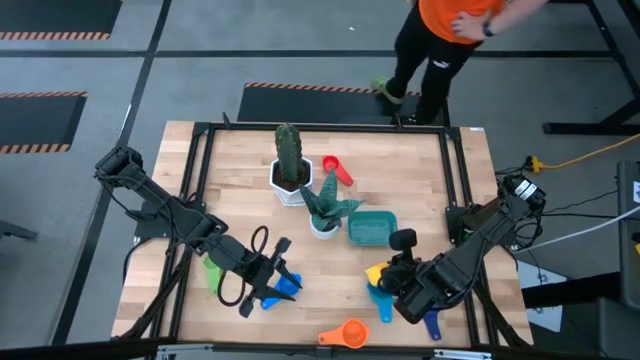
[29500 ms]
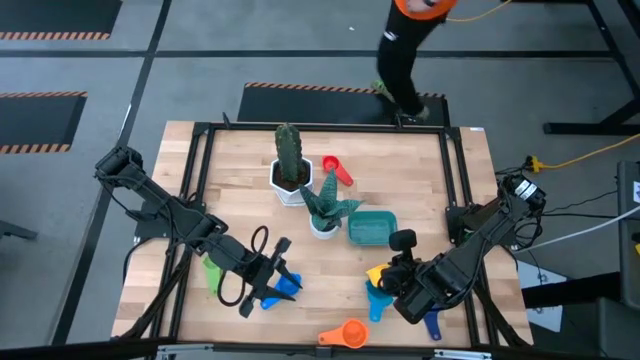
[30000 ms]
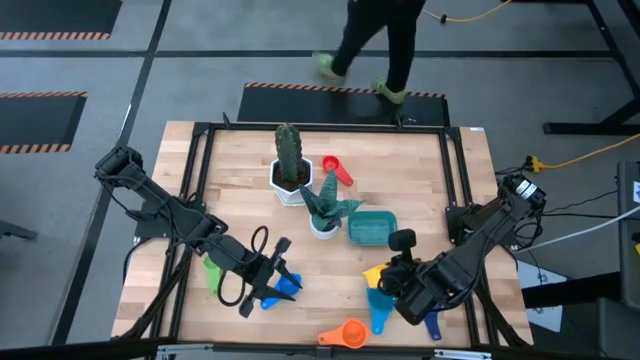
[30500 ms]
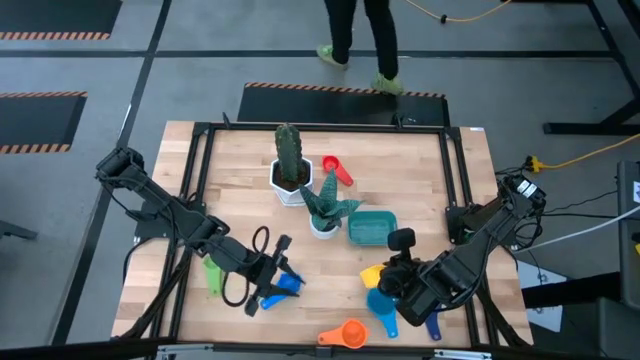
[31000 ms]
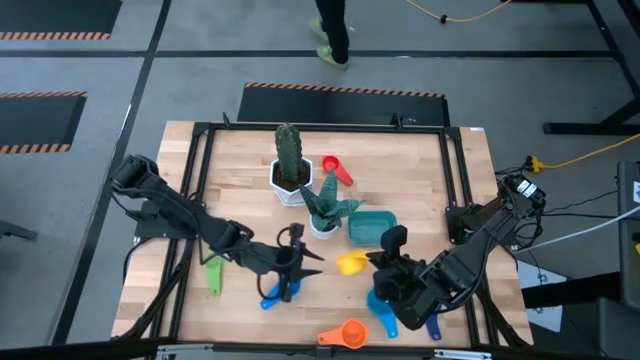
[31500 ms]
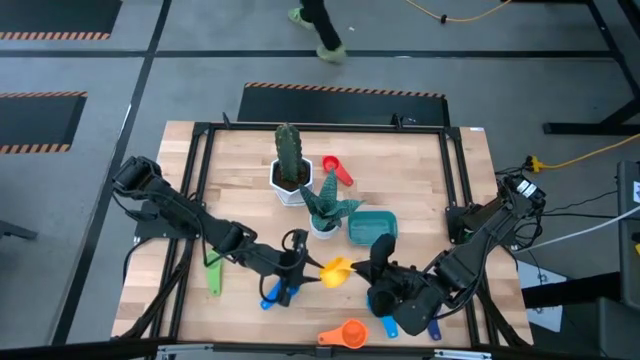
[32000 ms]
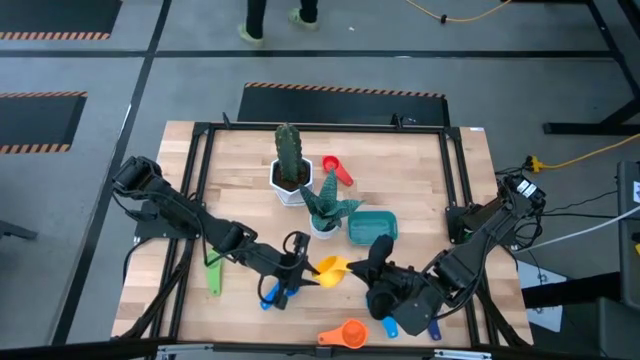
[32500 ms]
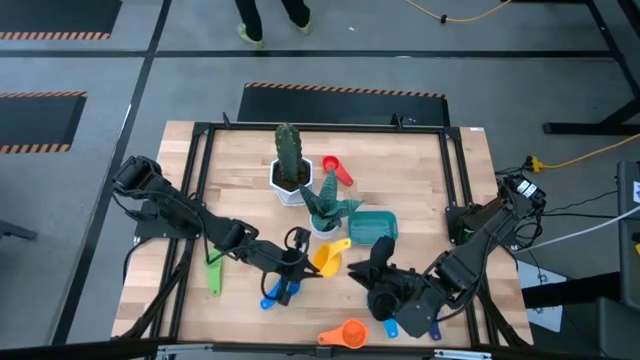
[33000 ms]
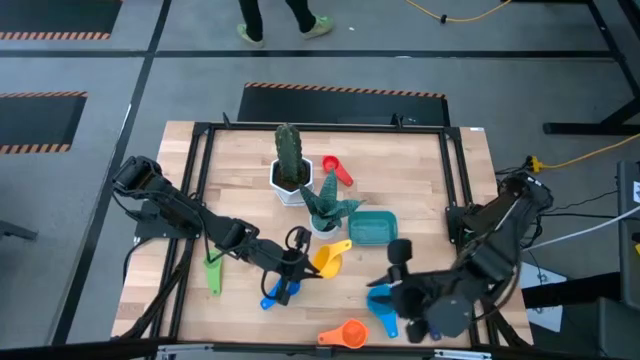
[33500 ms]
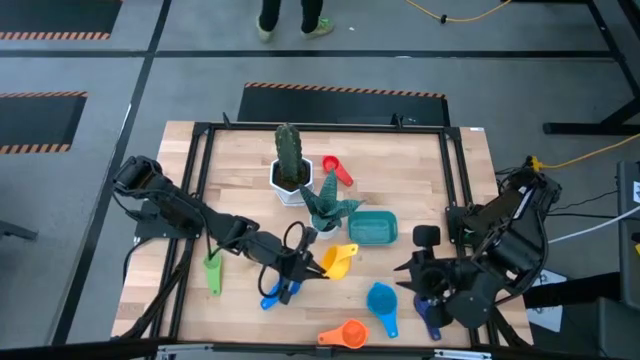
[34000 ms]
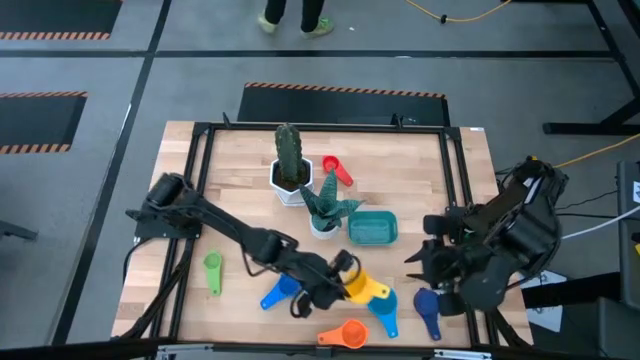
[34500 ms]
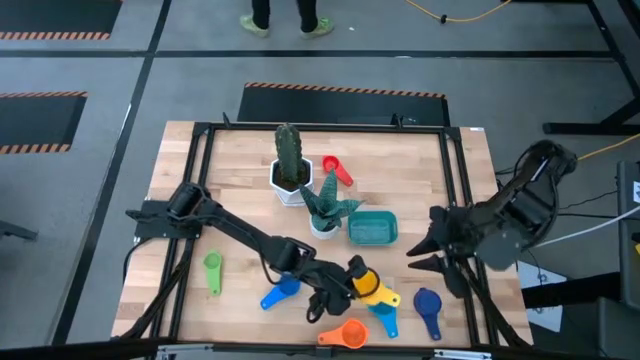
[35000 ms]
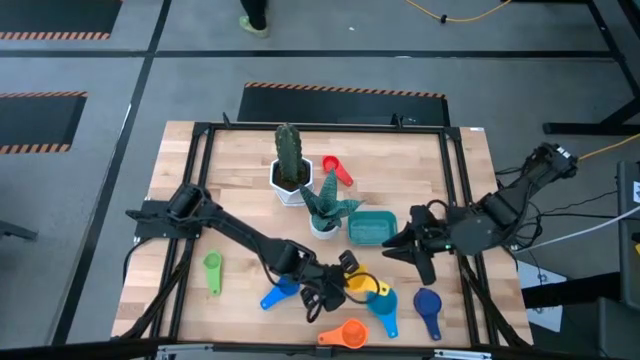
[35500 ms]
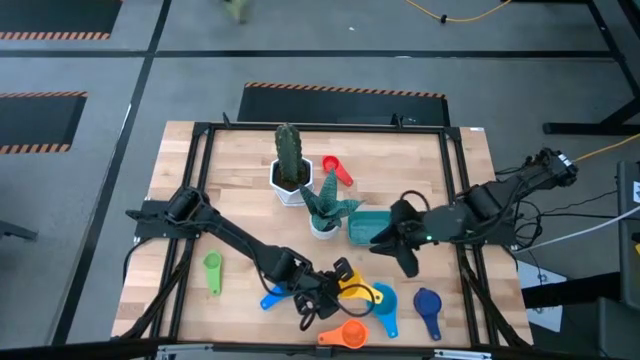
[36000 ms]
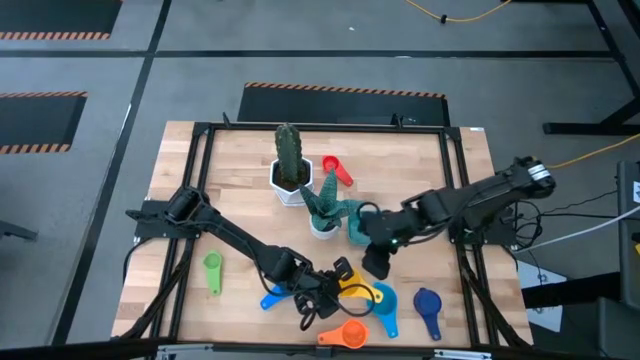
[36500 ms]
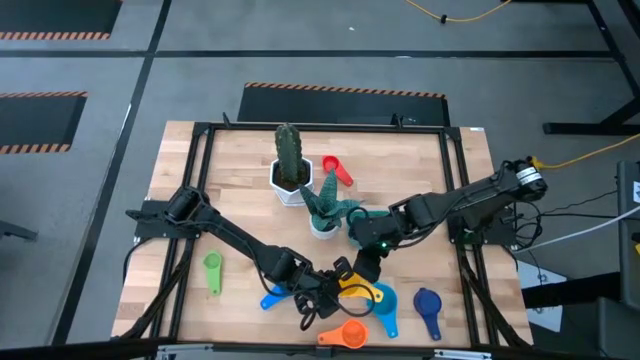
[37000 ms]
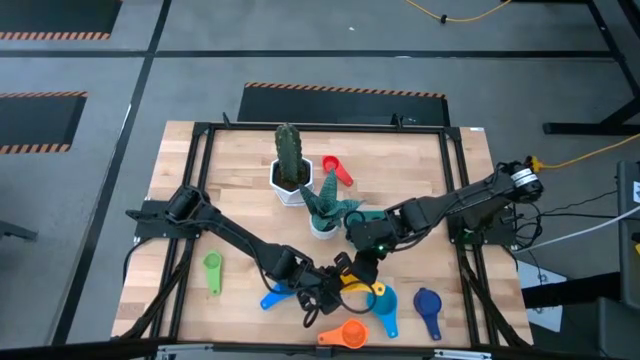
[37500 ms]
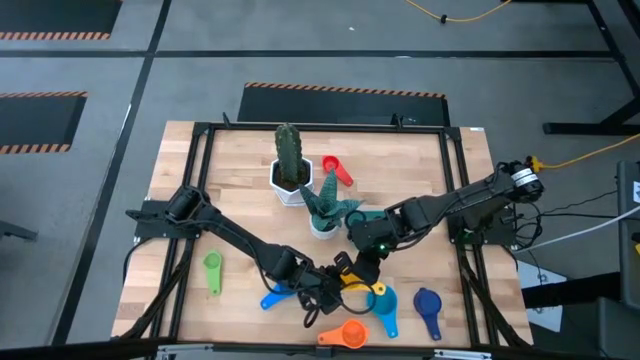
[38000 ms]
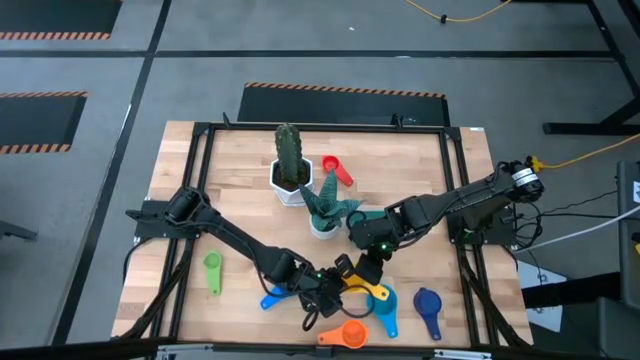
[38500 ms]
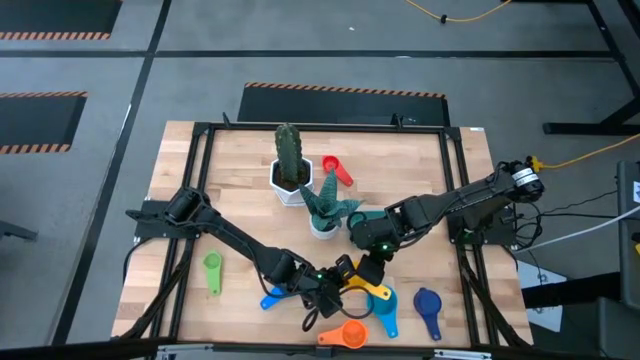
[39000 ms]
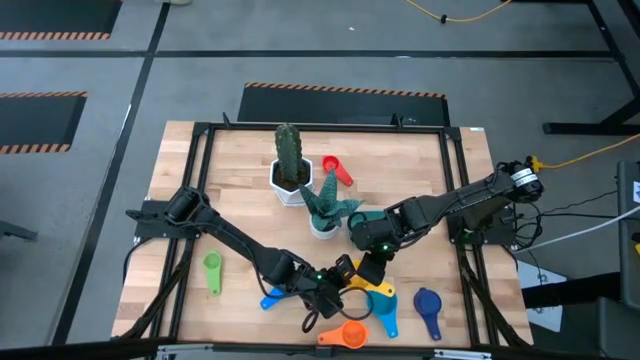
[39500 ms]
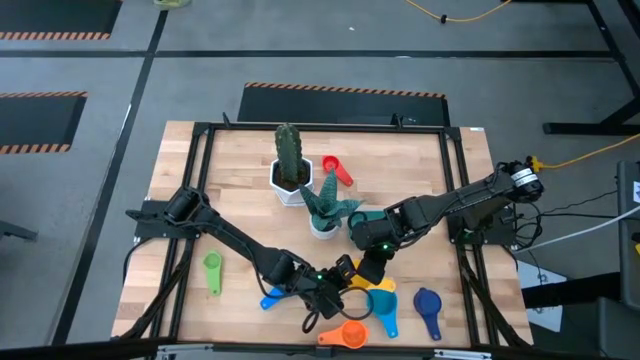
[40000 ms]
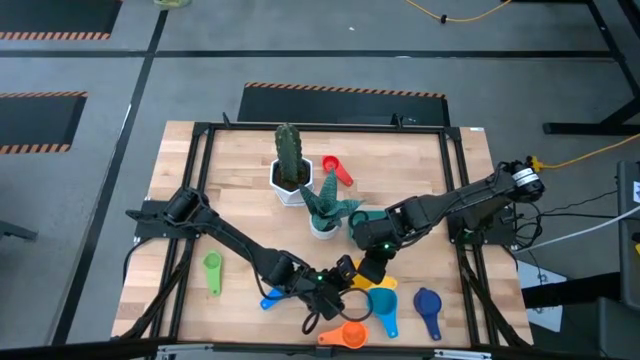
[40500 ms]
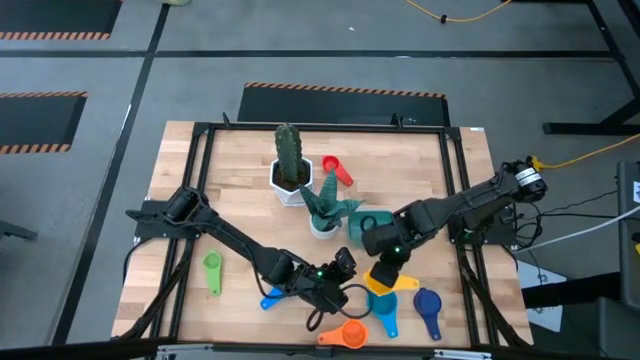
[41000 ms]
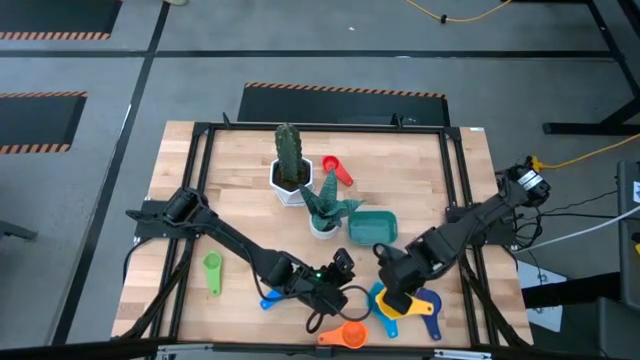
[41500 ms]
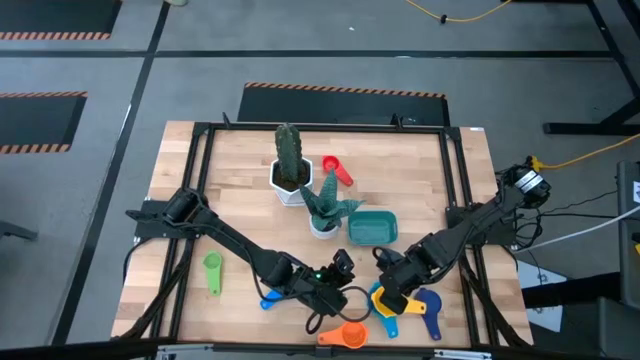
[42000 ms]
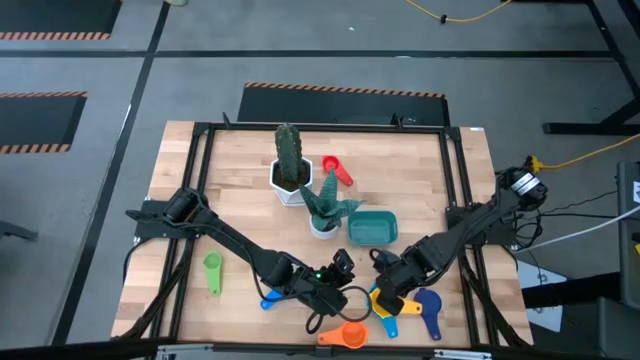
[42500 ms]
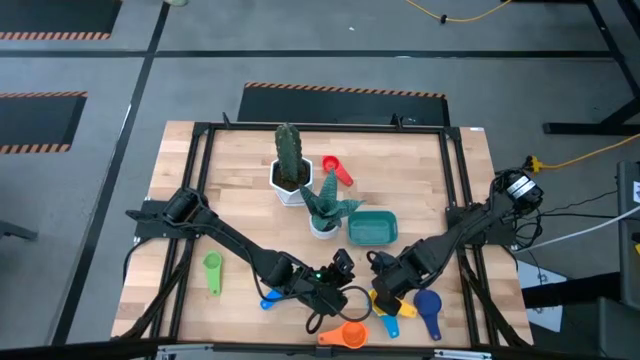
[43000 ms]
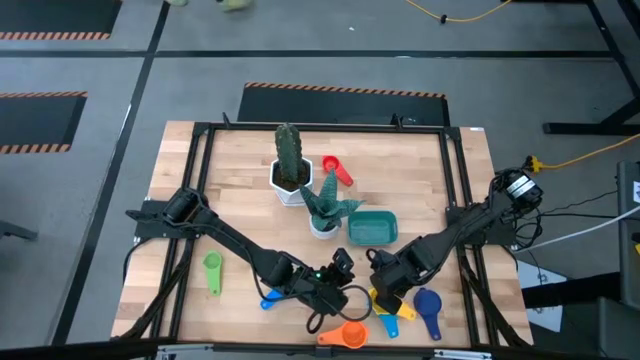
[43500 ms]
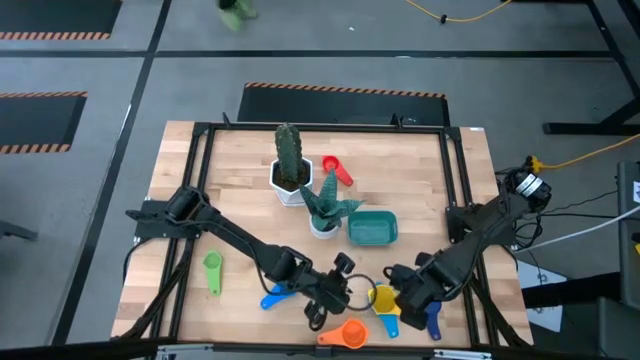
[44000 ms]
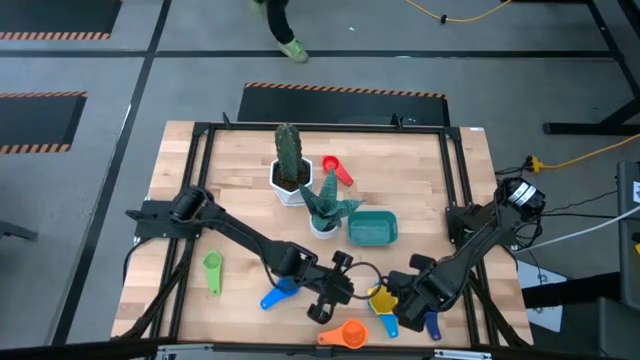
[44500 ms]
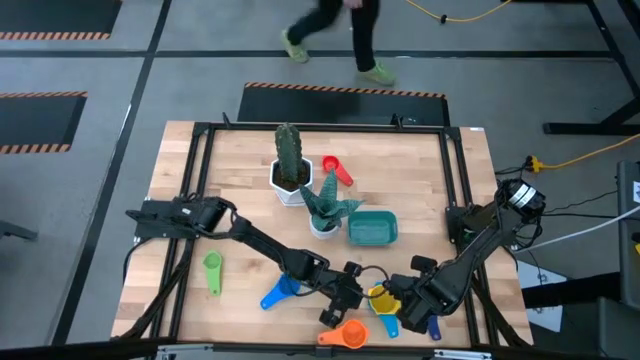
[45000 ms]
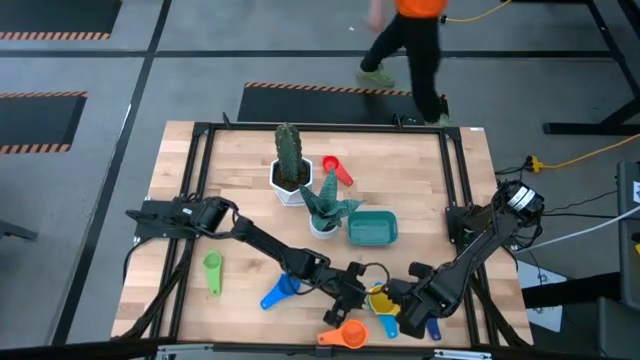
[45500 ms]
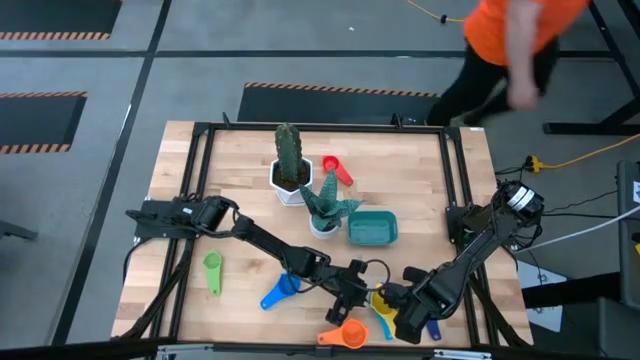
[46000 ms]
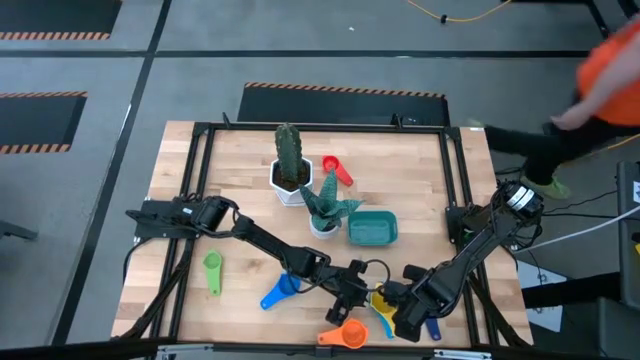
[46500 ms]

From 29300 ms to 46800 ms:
Task: Nest measuring cups in basket
Stack the yellow measuring cup on top of the light blue measuring cup

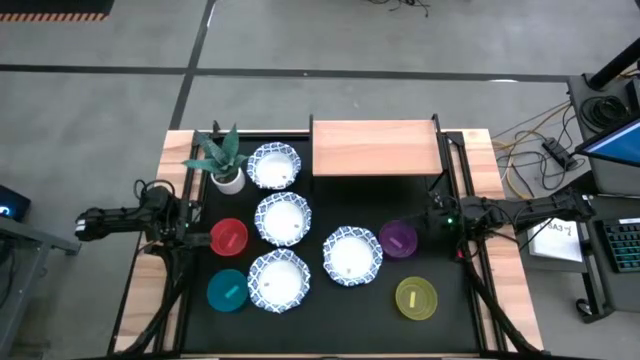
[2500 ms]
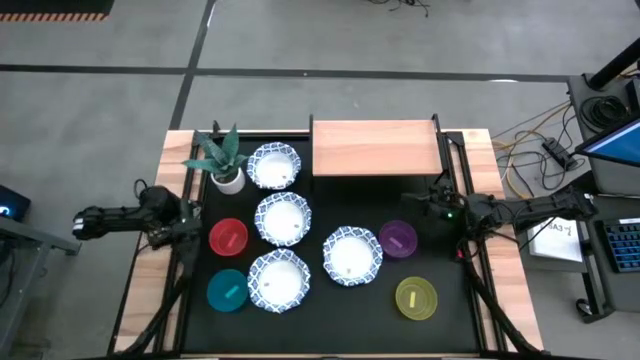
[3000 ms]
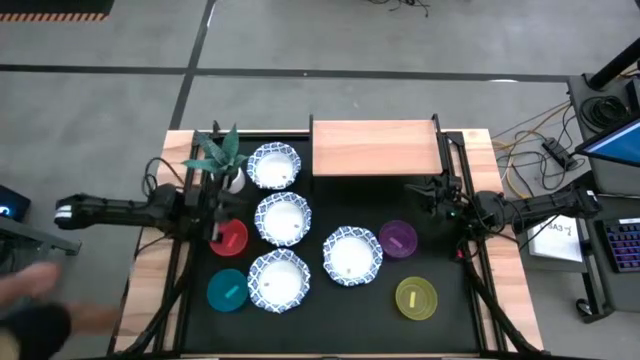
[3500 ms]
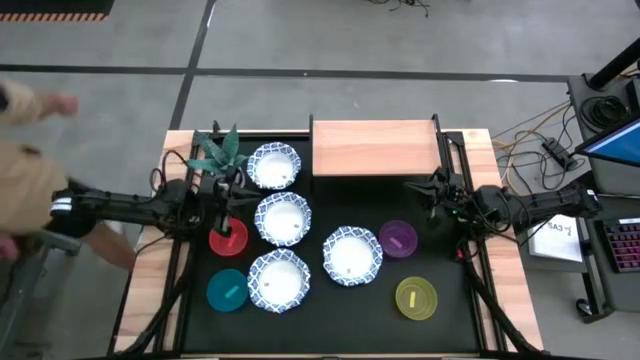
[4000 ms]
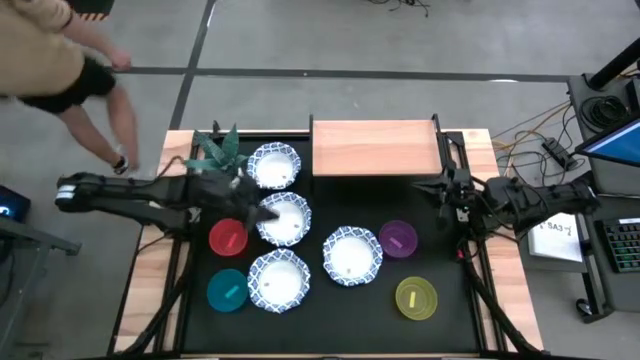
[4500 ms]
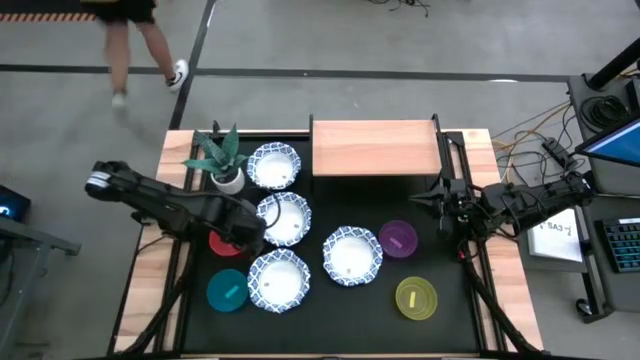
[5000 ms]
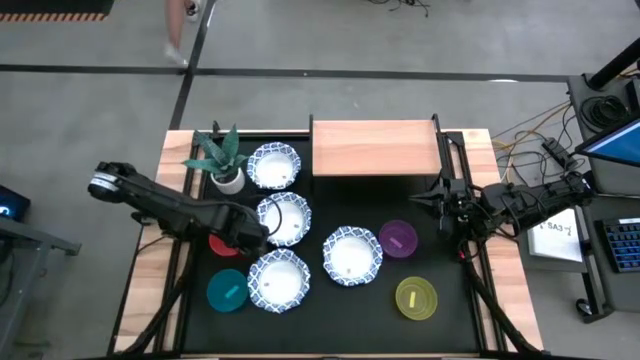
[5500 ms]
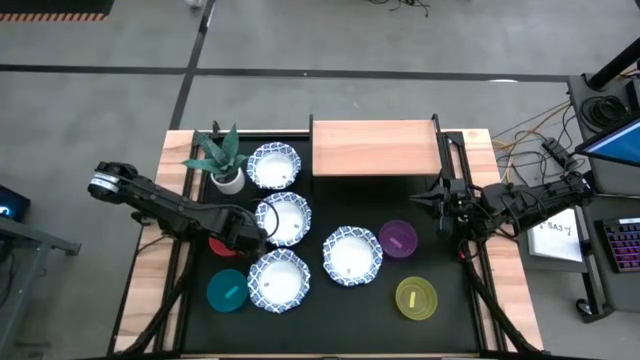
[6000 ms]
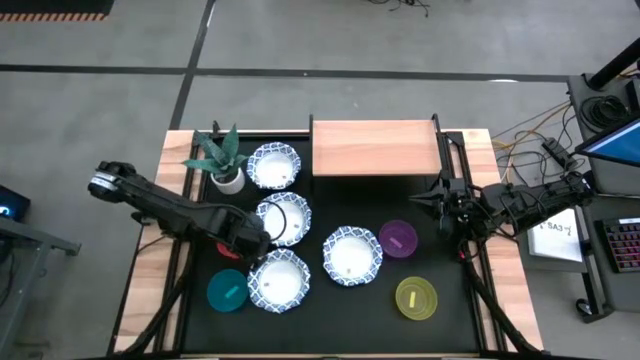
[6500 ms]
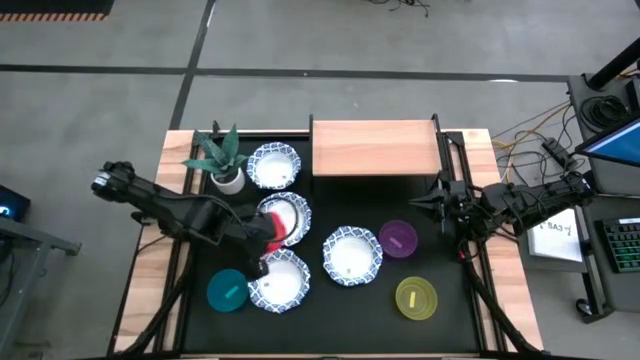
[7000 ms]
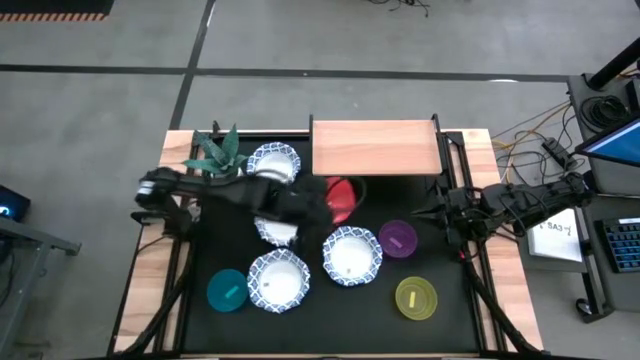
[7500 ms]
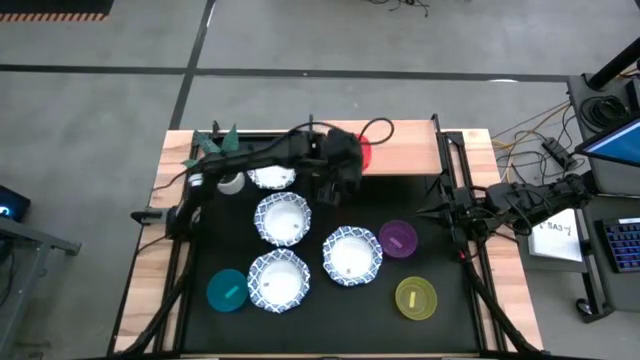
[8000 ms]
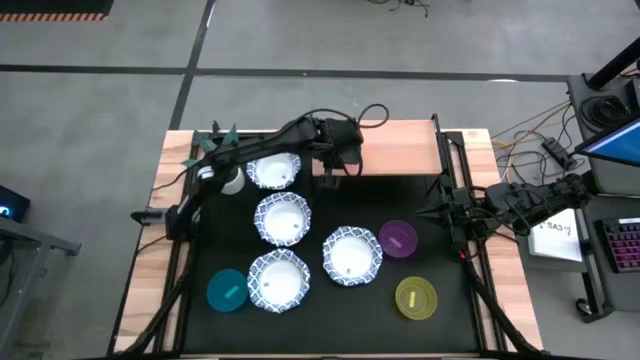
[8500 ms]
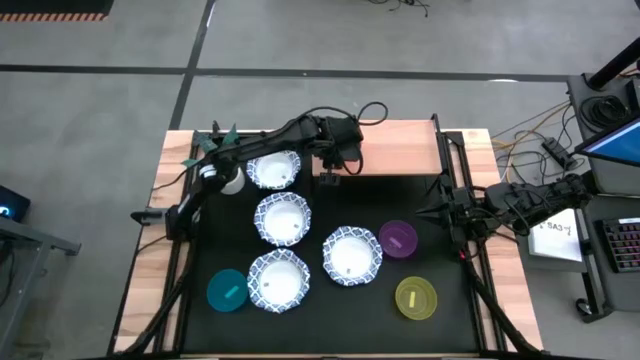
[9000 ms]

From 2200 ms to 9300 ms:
Task: Place and stack bowls onto a shelf
Put the orange bowl on the shelf
